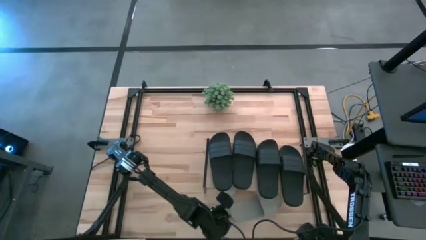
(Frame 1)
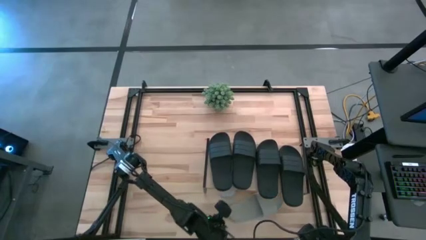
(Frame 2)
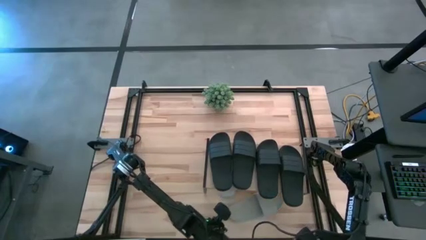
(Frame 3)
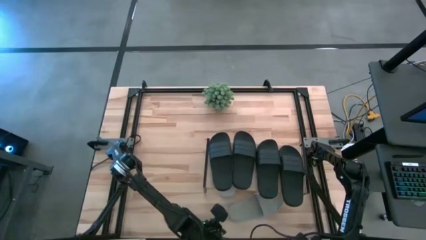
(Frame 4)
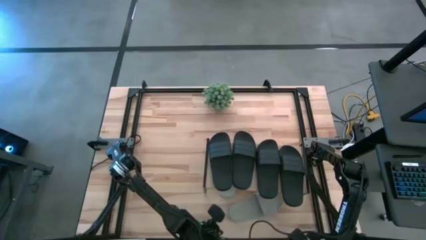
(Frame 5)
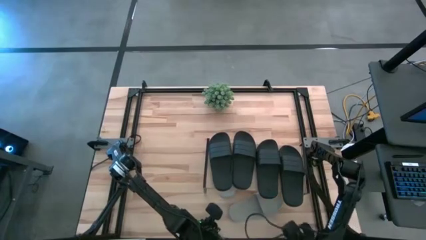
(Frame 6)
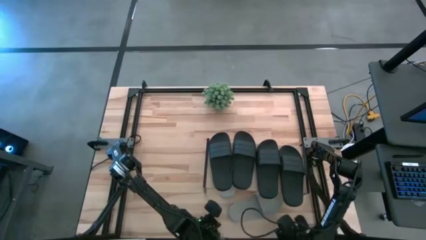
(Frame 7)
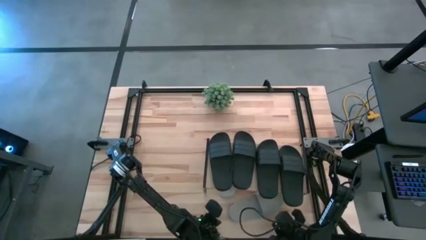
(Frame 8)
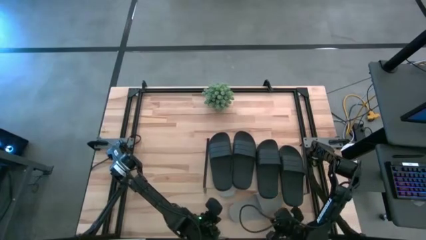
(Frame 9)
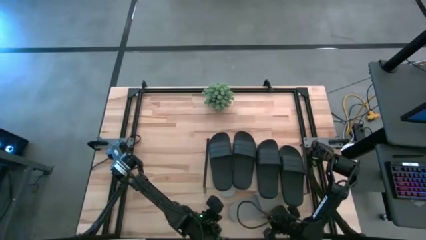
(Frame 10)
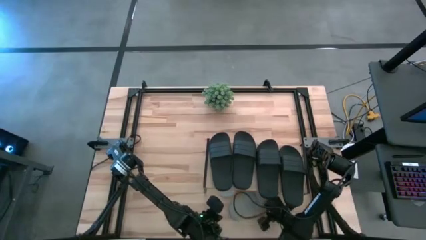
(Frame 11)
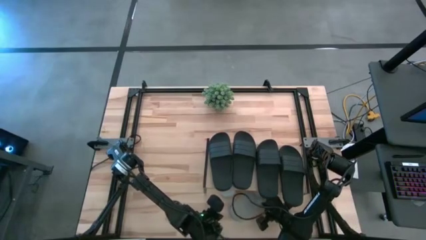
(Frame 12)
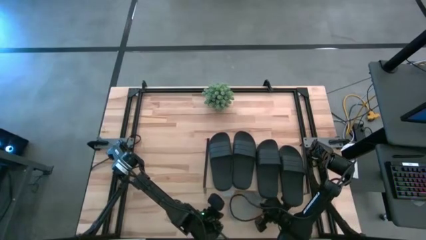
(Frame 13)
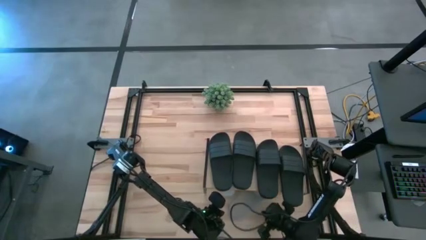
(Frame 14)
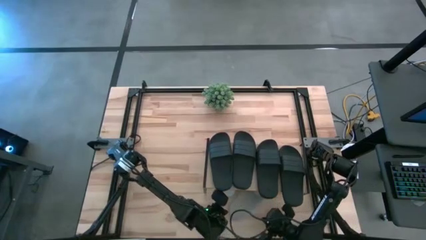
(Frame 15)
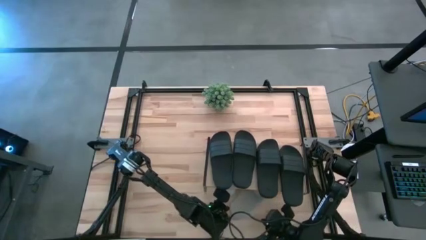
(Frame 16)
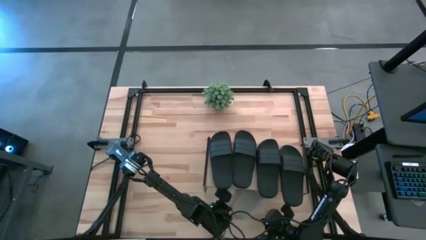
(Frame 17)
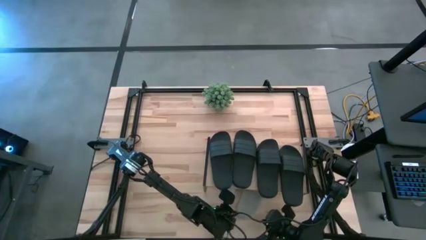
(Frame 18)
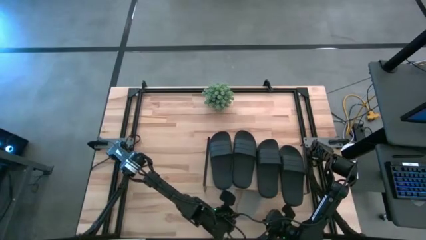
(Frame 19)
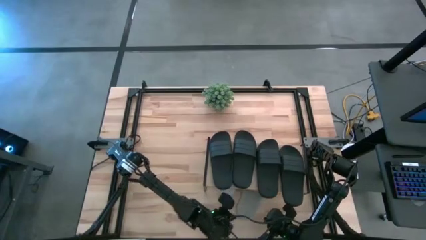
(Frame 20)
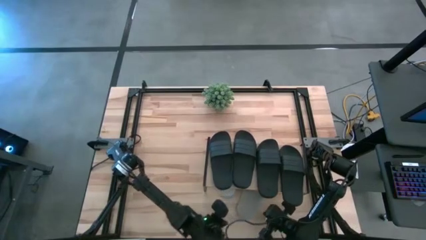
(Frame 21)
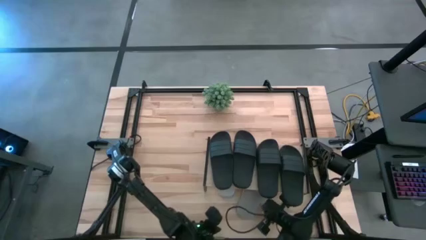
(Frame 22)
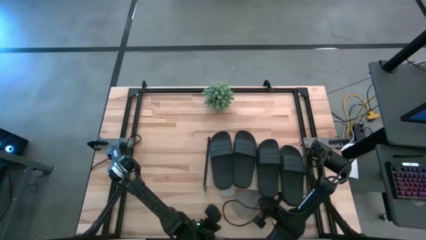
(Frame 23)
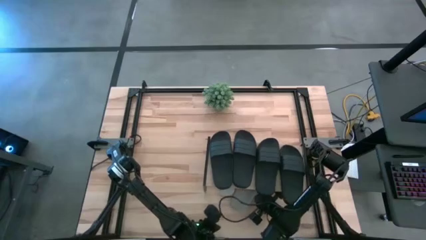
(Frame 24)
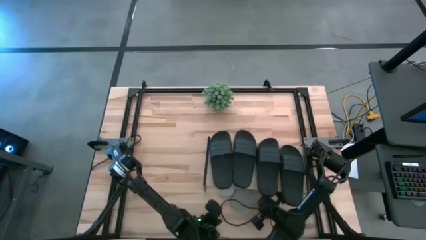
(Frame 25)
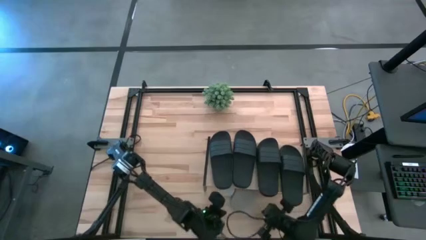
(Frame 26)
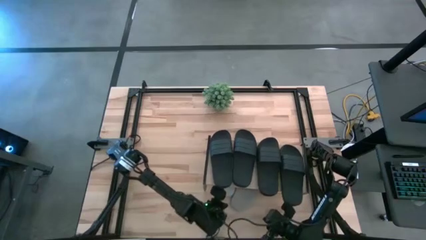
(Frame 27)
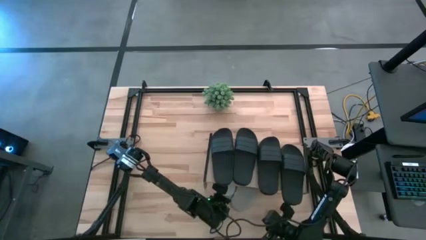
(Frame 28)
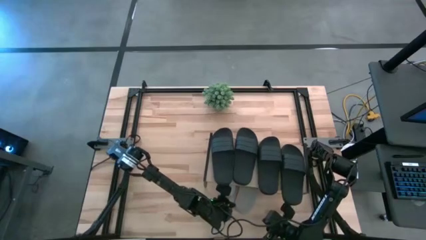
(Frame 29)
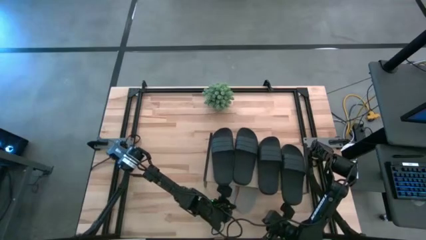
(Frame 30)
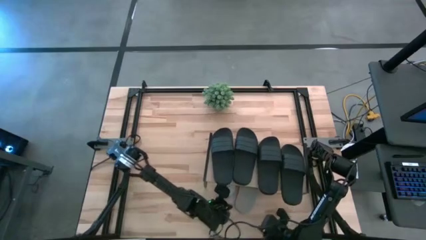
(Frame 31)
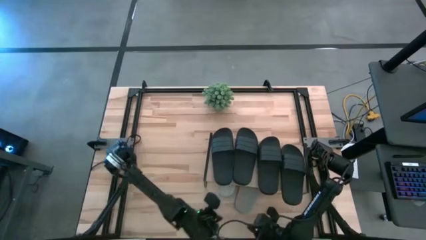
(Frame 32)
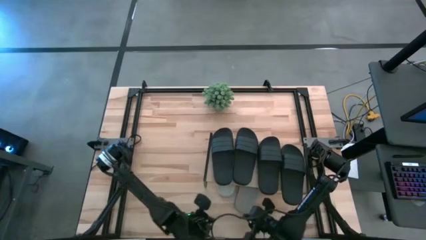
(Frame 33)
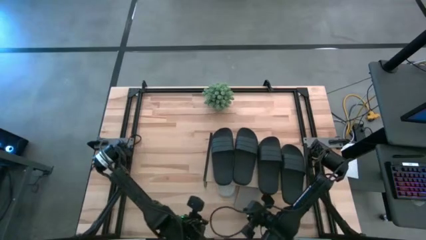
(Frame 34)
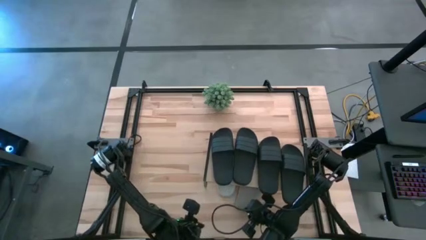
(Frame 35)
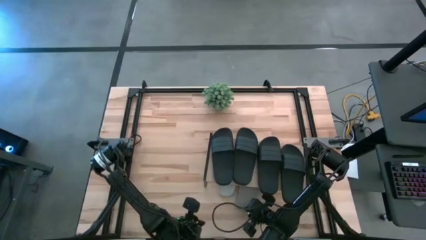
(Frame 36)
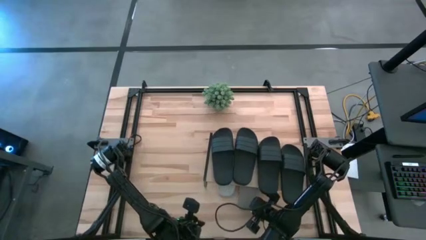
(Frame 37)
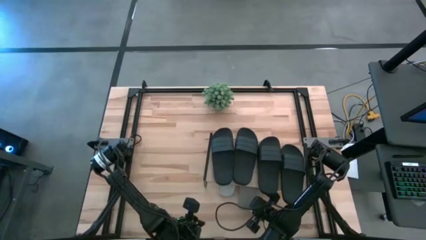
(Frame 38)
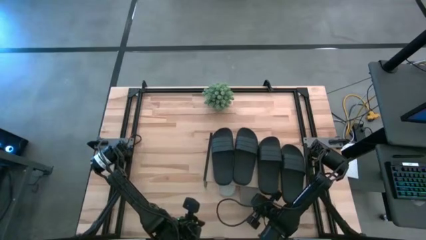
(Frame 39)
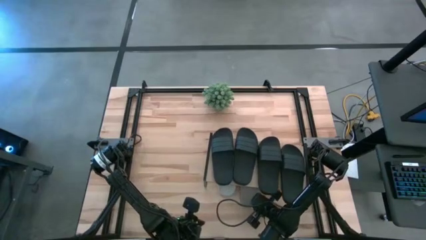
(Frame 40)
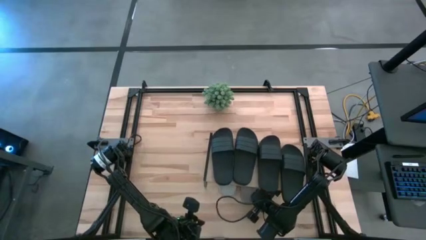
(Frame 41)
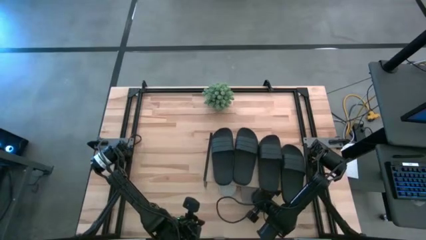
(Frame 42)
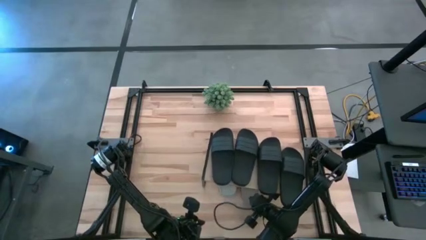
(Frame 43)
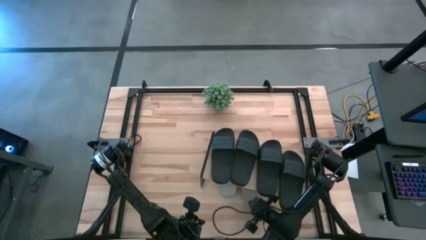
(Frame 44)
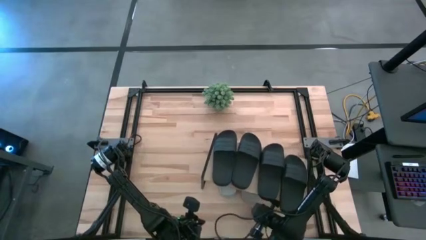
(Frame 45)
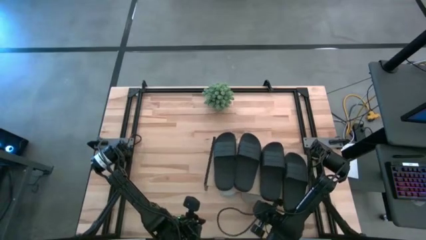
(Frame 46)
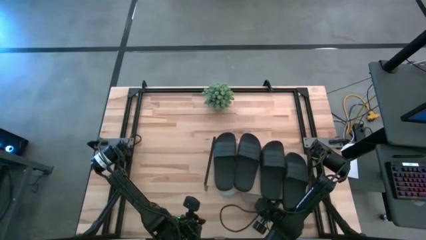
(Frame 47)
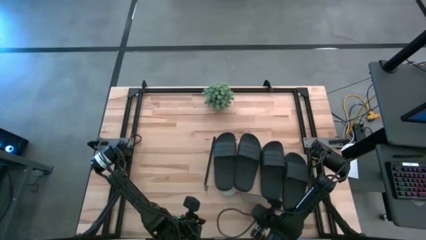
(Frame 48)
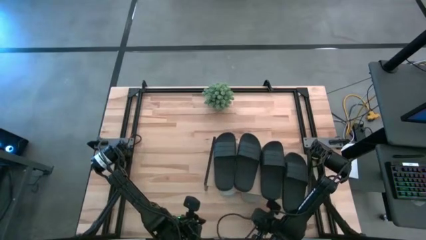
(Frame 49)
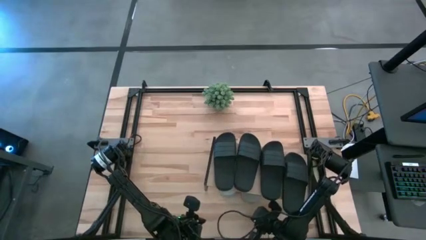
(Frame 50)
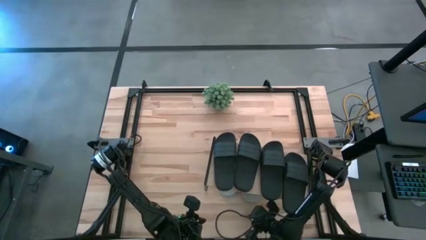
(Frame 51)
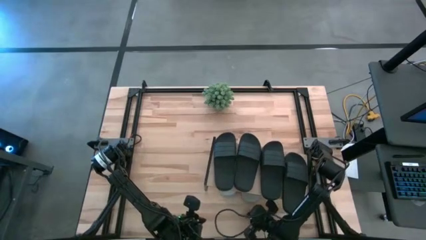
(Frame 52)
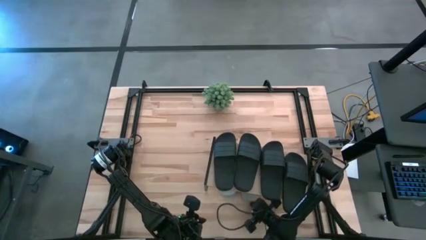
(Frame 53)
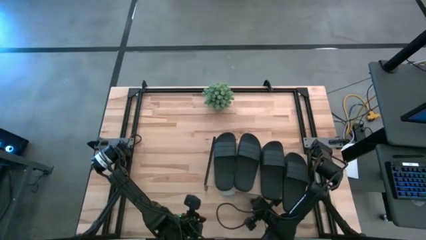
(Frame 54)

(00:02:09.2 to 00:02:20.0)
Task: Pick and place slides into the shelf
Put the white slipper under the shelf

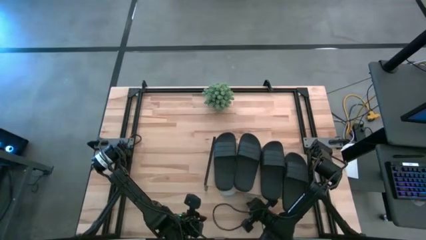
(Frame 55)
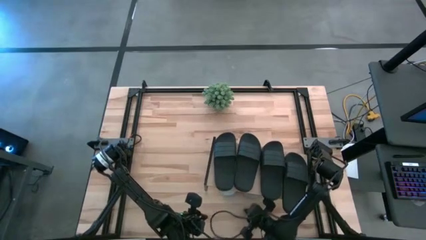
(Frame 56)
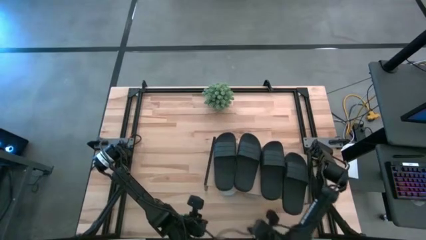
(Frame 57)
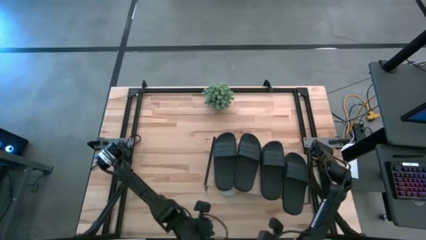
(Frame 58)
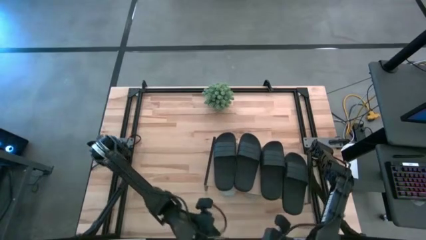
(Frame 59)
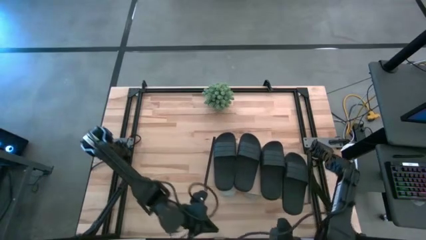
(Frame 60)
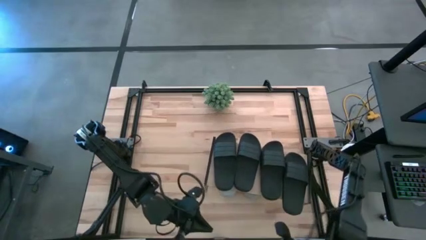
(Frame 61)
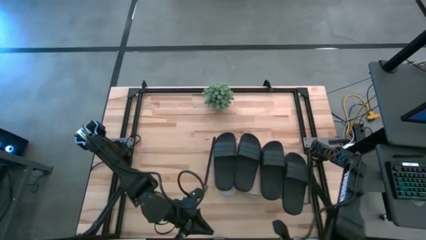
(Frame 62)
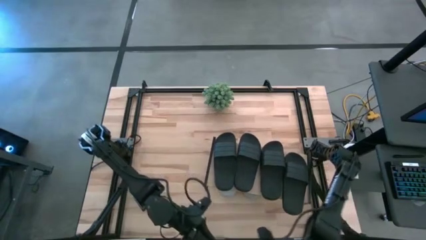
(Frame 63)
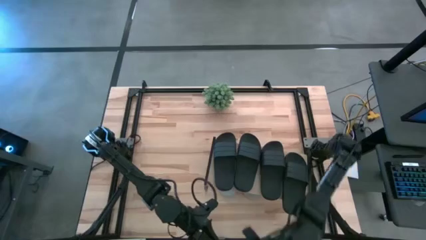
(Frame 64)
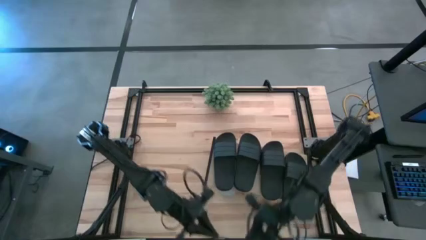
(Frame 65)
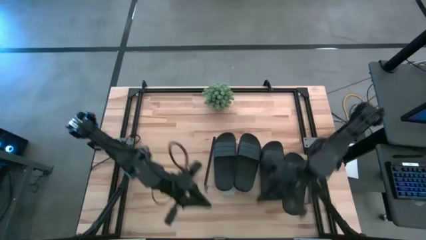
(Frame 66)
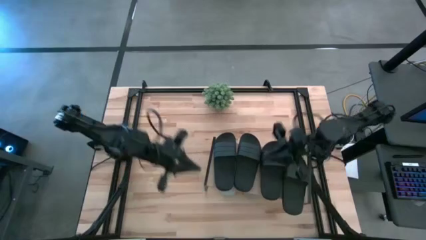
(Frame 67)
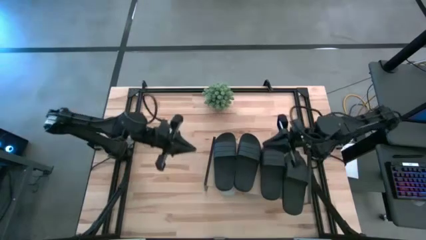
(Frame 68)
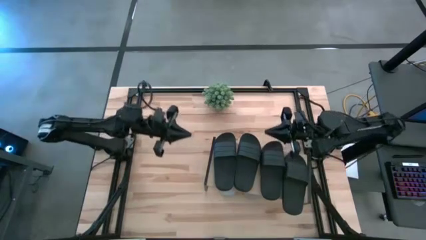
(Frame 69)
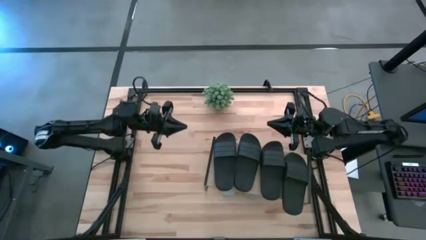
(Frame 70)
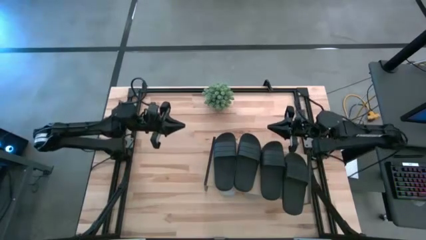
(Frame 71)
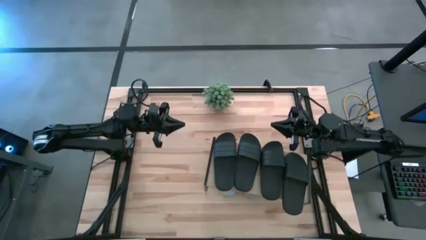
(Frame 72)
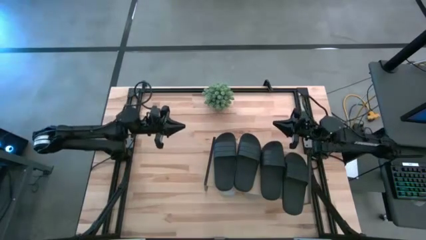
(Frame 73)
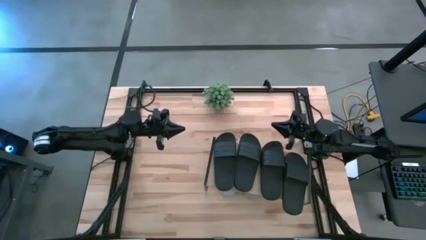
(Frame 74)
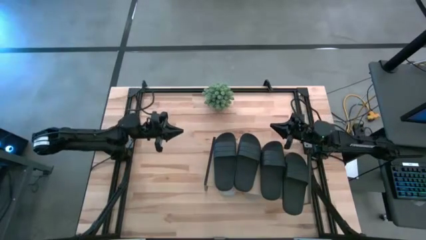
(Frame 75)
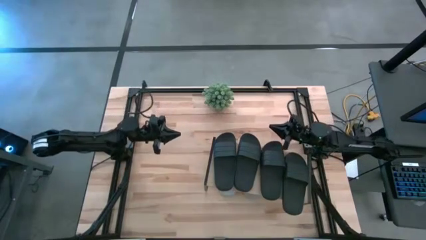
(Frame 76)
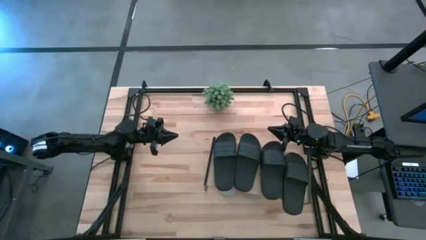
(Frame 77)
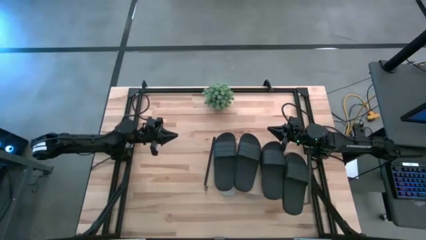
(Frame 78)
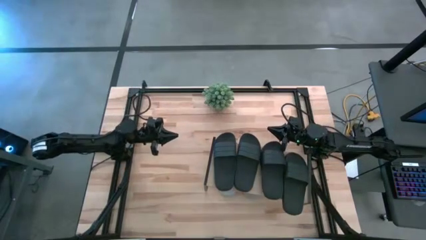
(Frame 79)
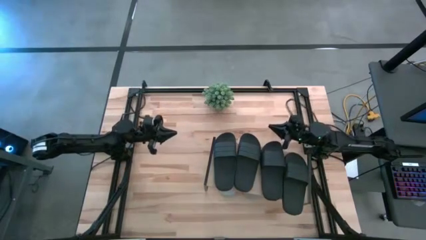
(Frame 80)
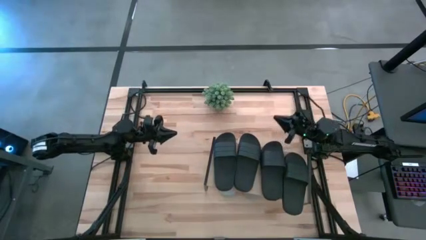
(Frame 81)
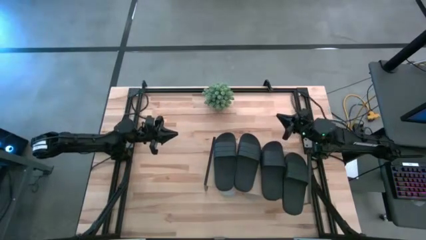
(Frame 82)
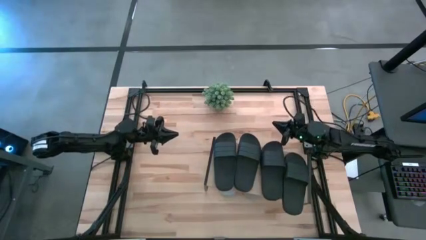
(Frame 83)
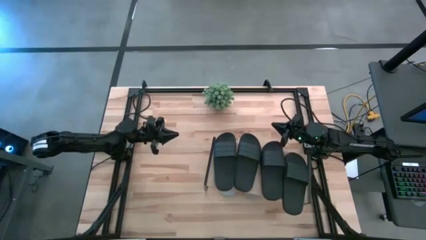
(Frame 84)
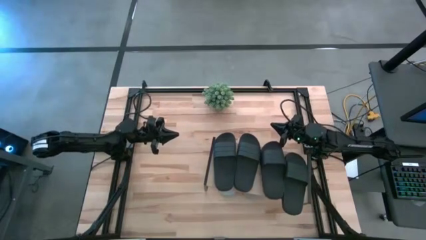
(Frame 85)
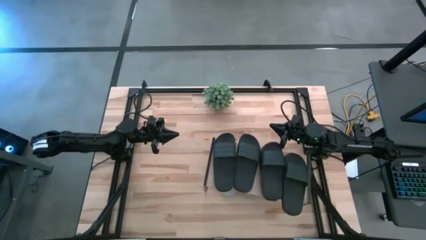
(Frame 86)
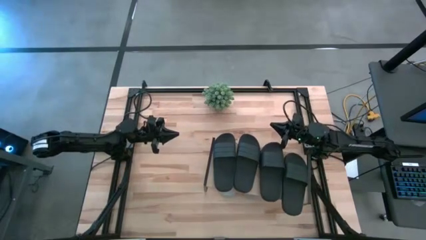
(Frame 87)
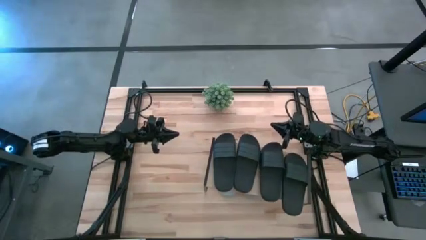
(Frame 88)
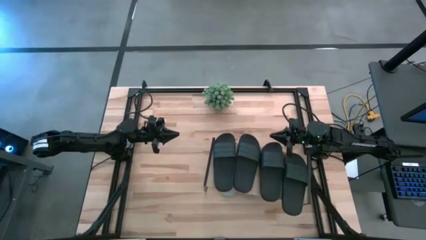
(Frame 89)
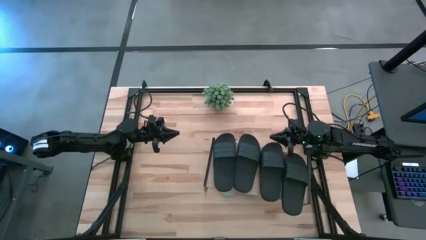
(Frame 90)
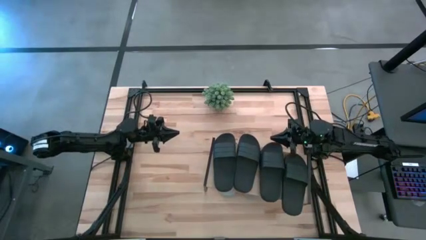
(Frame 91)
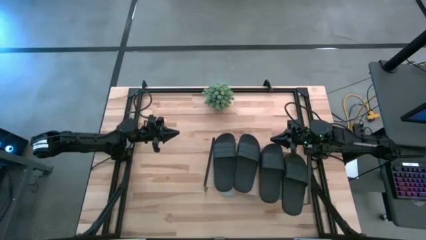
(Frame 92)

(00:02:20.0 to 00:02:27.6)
Adjust the black slipper on the shelf
